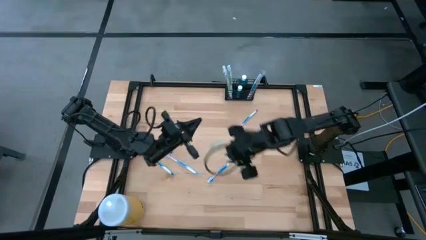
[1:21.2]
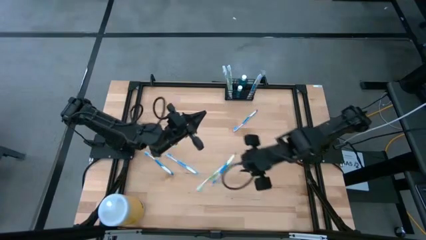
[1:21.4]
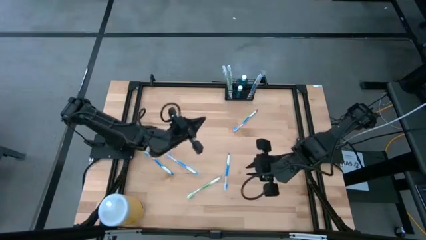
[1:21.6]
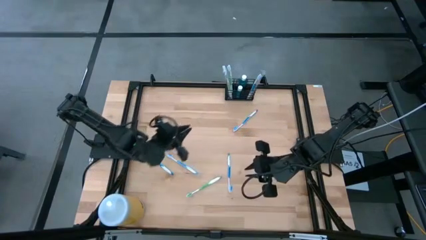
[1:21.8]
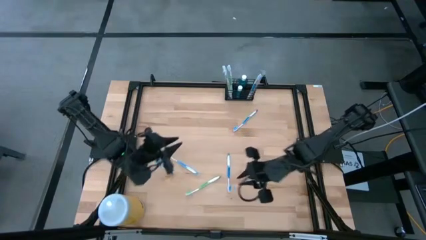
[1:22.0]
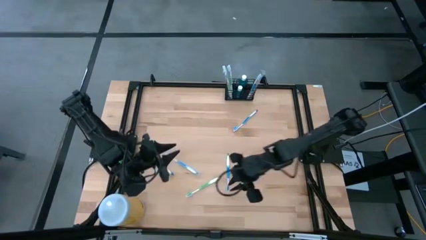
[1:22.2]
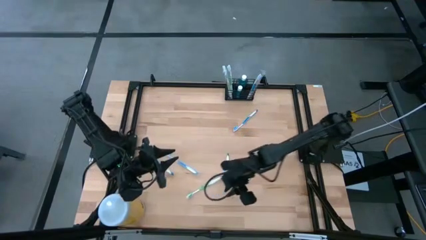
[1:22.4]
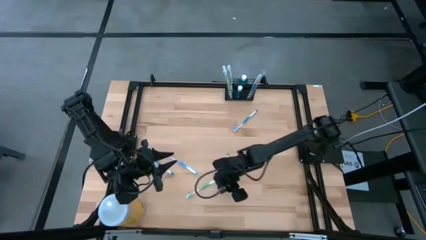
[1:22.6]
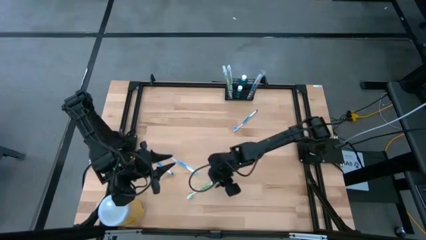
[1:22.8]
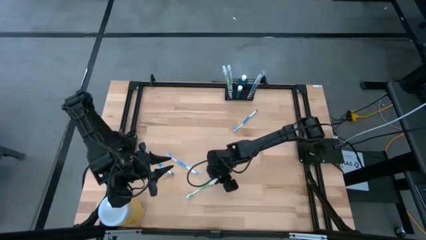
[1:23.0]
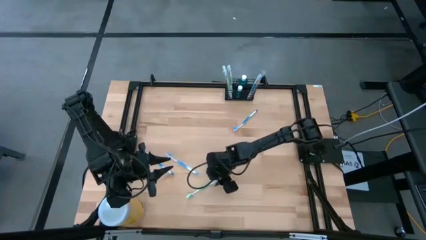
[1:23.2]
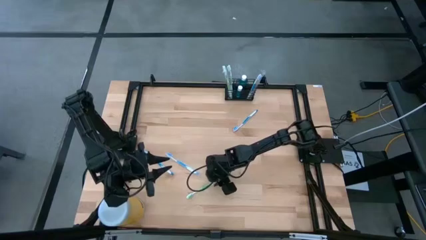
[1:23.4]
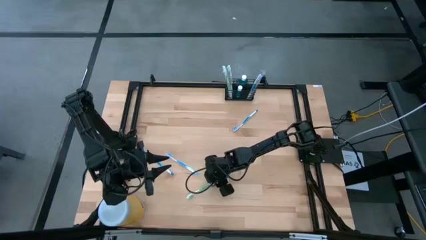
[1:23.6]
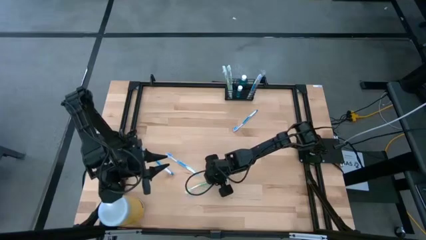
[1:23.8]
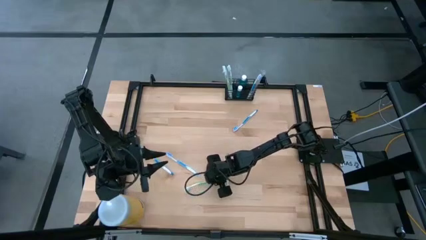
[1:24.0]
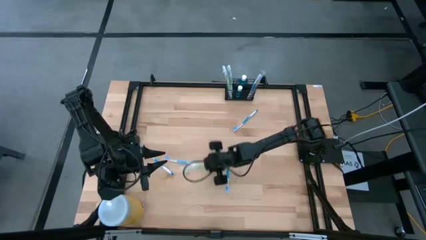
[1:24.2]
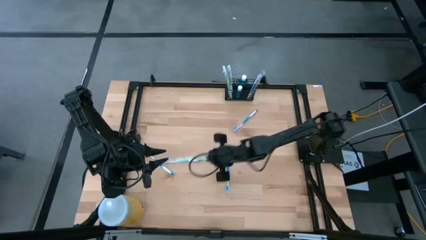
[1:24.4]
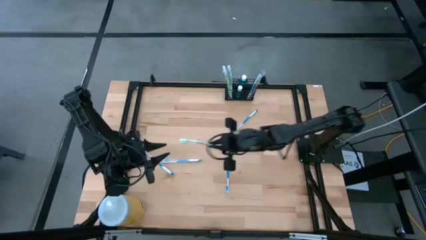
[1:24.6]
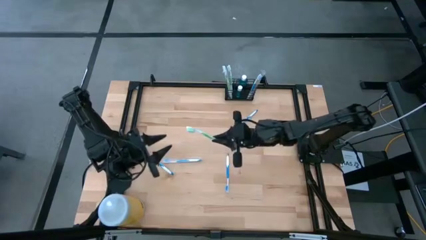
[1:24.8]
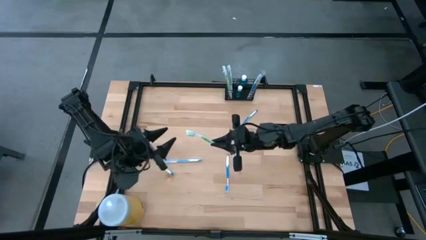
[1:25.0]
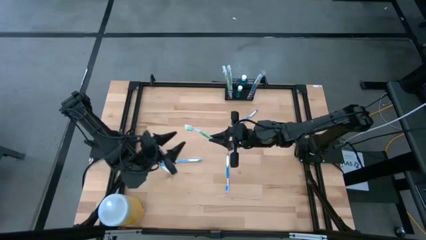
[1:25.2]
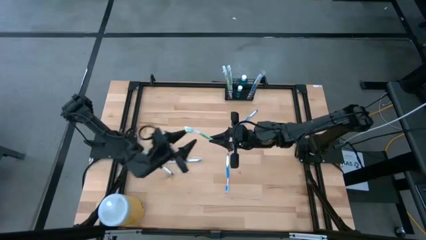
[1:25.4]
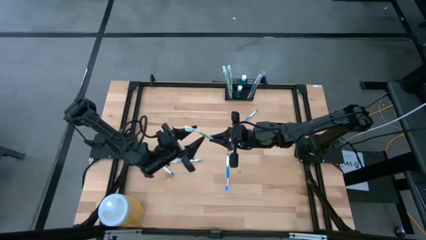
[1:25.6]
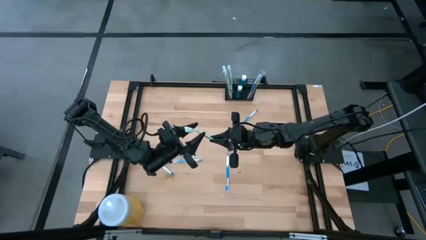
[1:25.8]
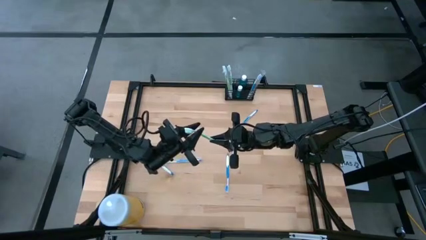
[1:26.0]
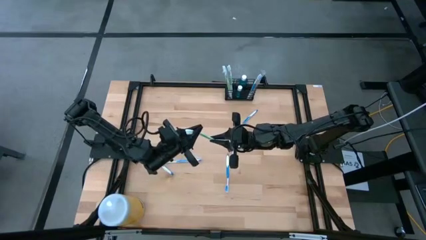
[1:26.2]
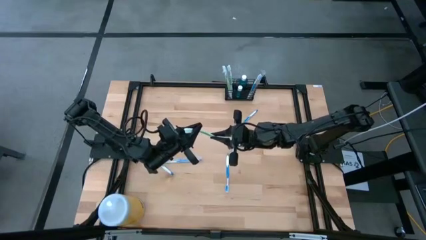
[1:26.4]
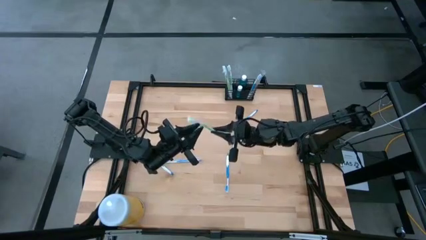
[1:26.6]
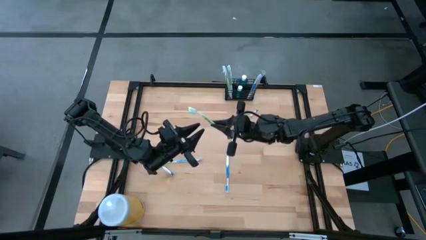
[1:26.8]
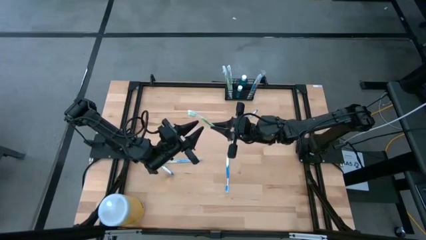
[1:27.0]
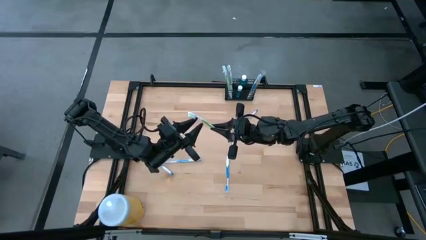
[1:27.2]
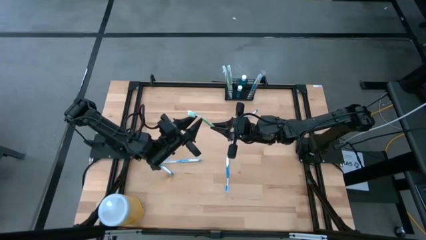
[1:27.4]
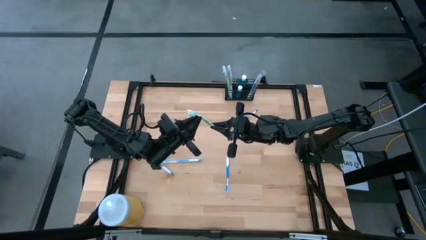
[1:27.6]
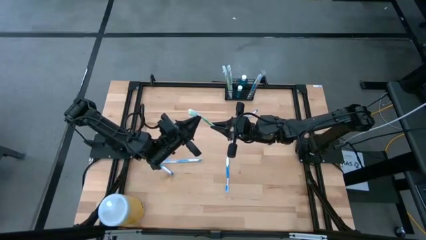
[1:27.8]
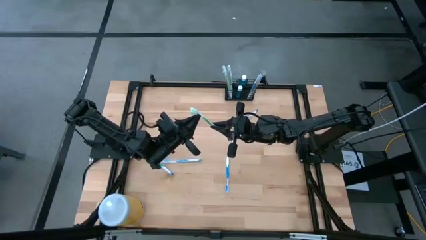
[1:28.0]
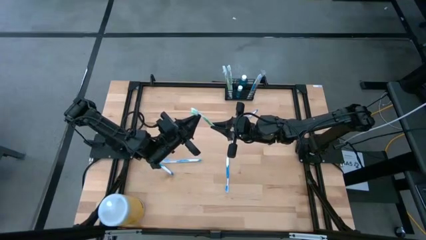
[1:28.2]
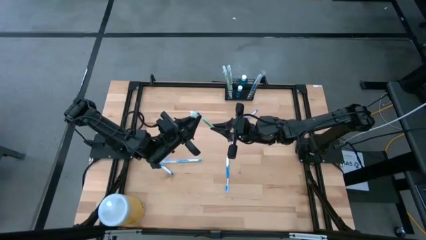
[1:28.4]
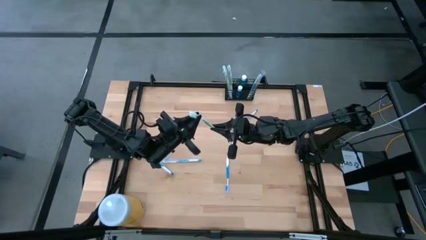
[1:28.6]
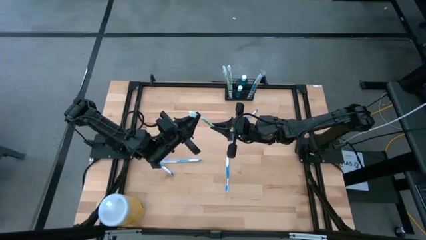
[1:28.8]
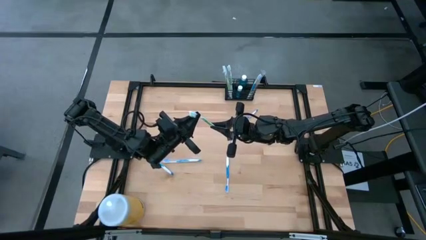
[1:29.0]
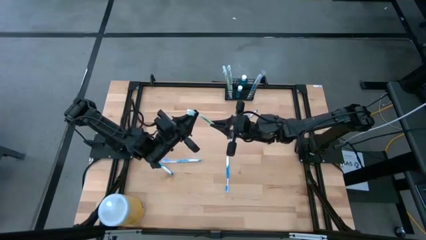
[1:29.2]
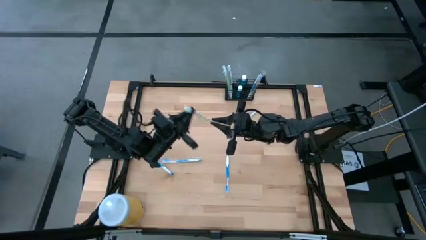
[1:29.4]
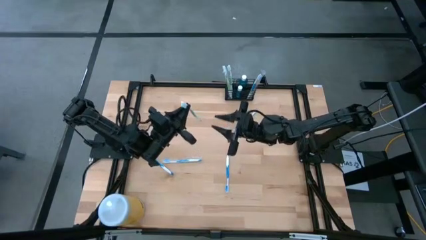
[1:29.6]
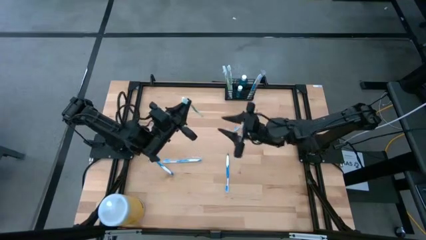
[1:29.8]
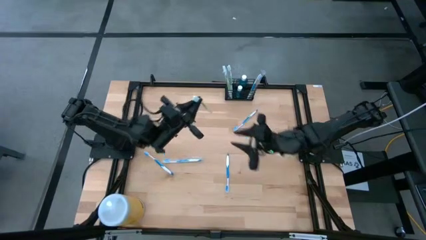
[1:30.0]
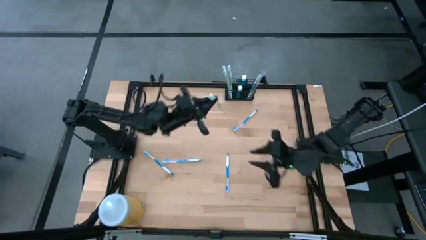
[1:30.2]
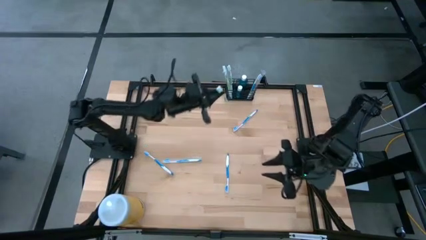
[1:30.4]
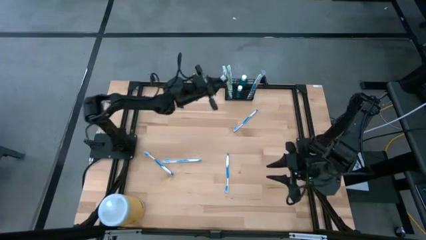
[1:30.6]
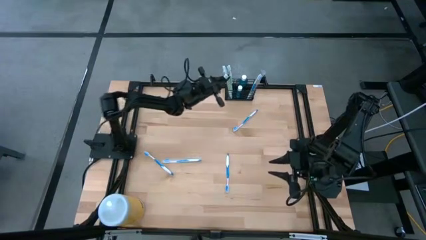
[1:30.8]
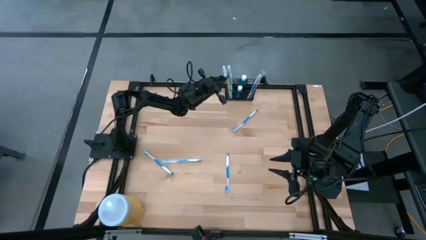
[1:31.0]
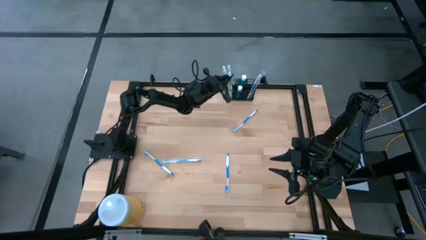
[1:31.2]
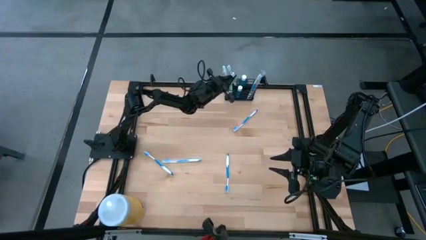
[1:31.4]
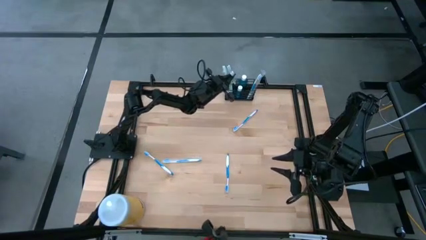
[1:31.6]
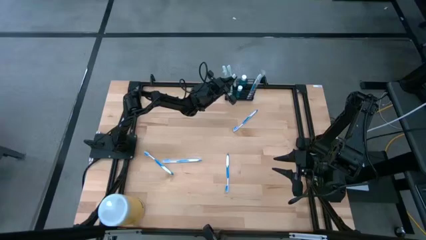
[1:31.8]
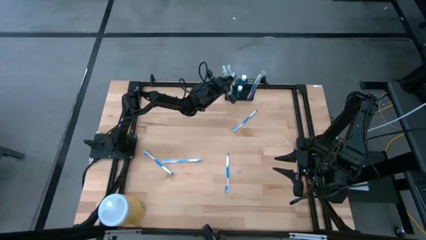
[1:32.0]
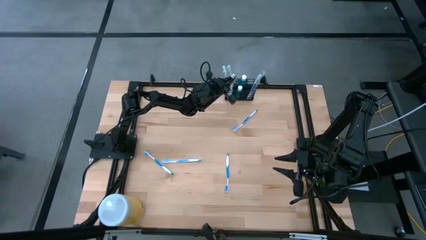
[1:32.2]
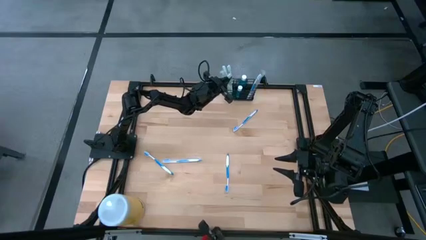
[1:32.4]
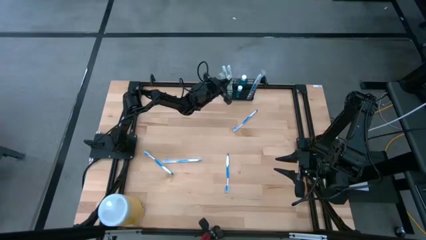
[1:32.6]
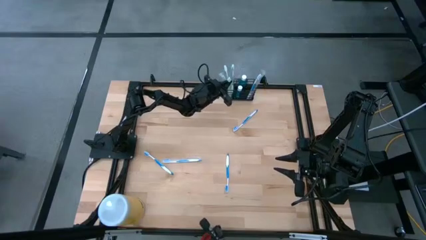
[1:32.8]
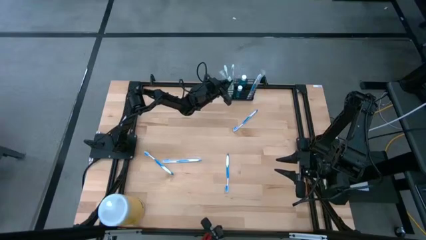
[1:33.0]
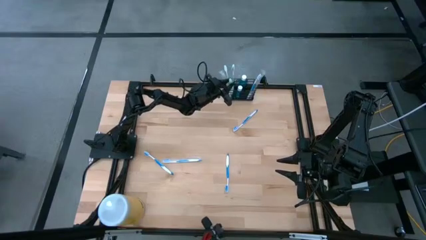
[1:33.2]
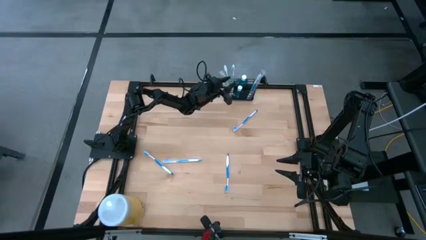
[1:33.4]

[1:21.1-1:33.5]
Task: Pick & Place toothbrushing station
Put the green toothbrush into the black organizer

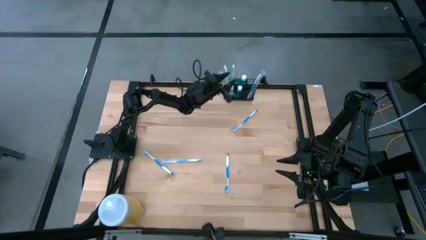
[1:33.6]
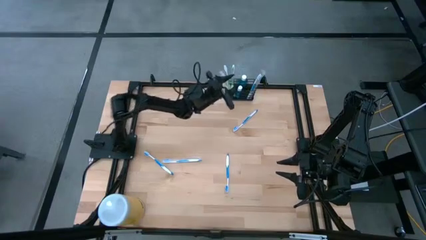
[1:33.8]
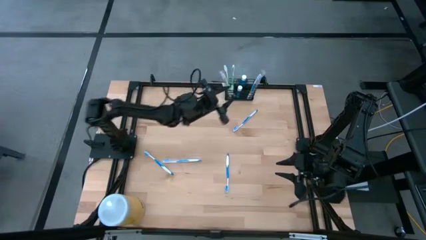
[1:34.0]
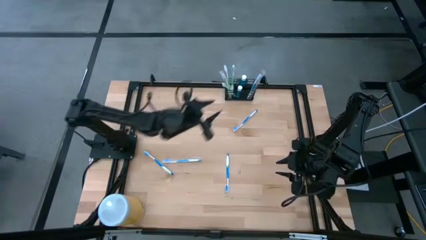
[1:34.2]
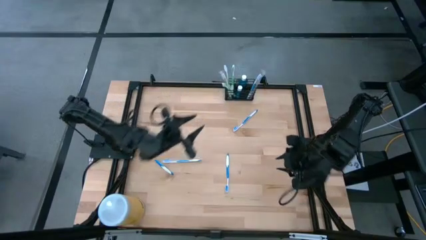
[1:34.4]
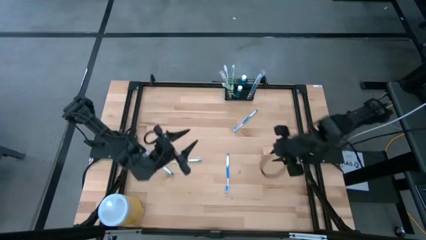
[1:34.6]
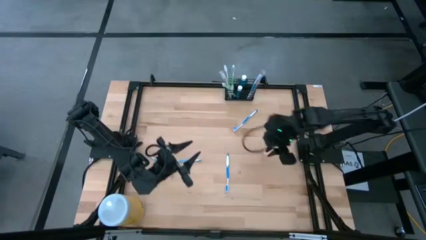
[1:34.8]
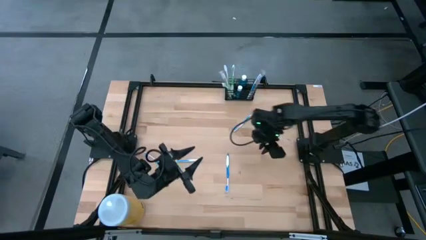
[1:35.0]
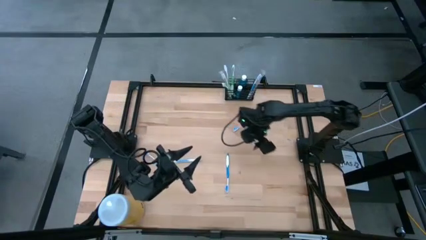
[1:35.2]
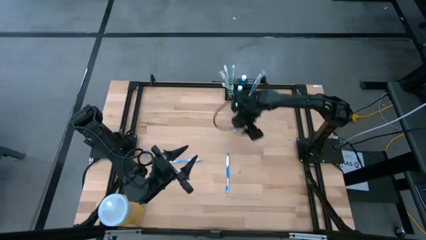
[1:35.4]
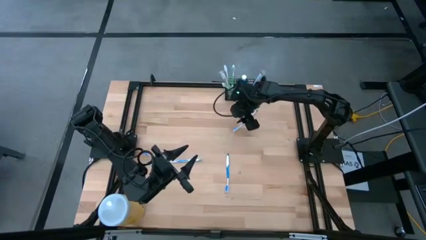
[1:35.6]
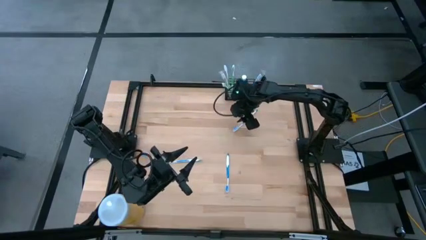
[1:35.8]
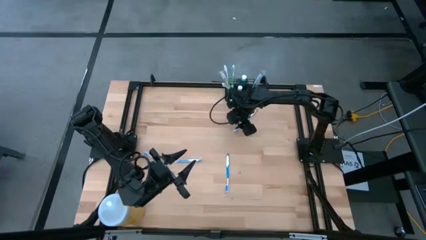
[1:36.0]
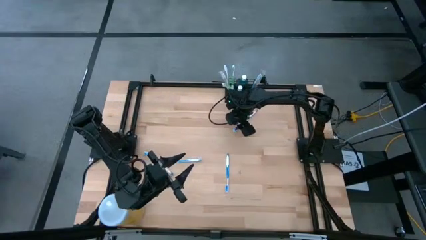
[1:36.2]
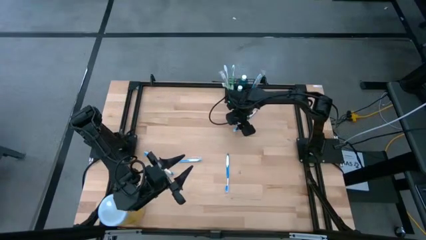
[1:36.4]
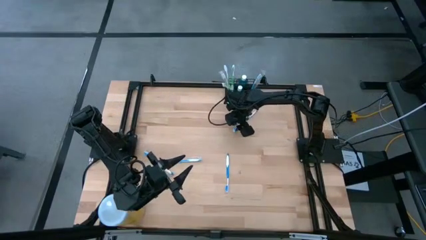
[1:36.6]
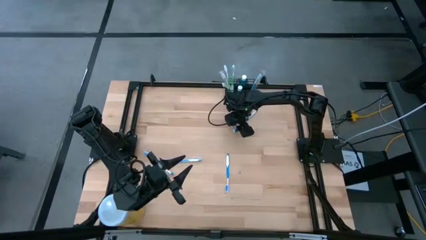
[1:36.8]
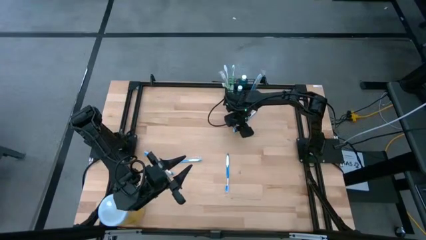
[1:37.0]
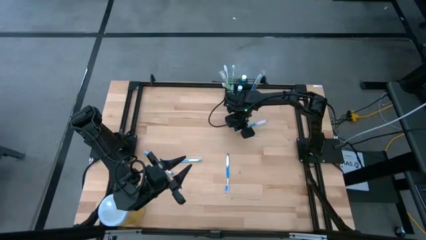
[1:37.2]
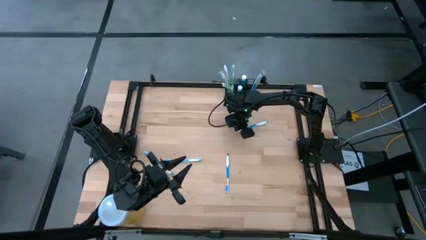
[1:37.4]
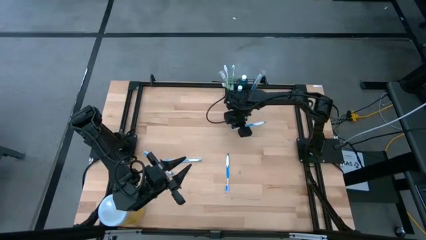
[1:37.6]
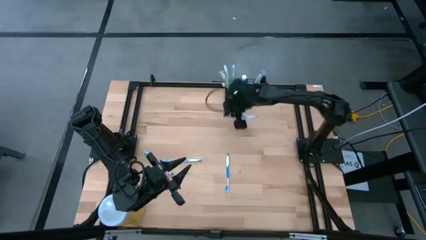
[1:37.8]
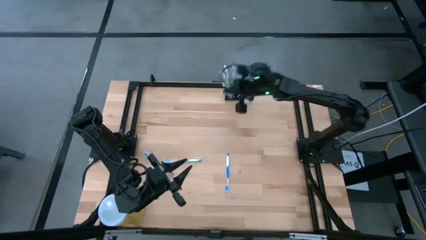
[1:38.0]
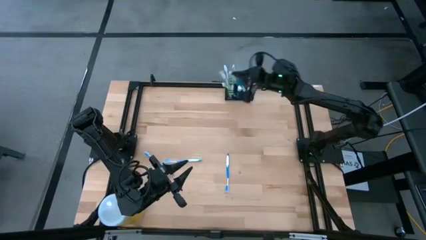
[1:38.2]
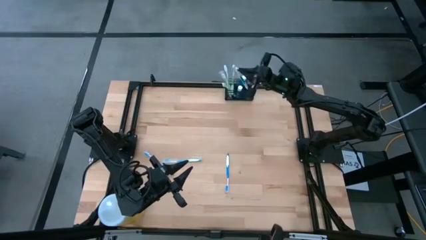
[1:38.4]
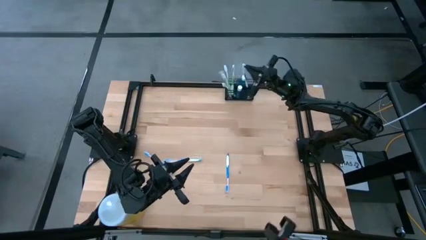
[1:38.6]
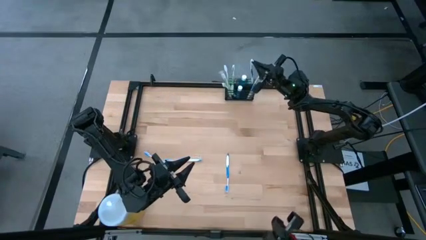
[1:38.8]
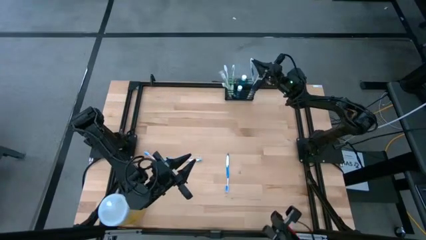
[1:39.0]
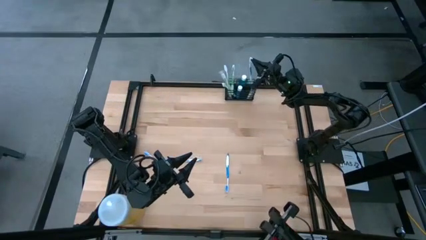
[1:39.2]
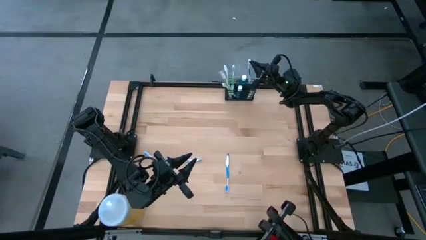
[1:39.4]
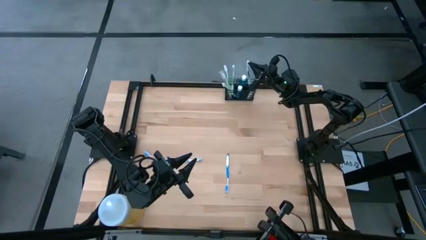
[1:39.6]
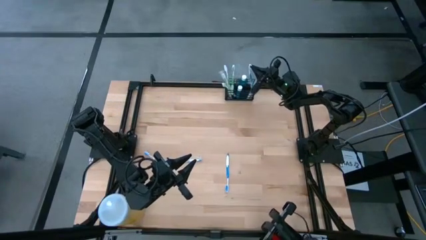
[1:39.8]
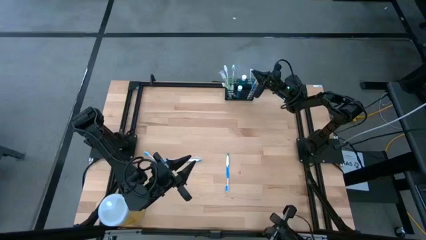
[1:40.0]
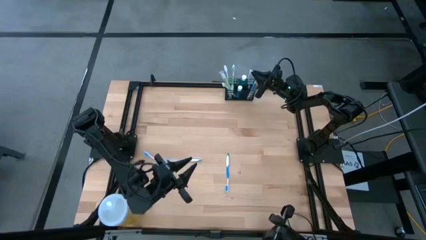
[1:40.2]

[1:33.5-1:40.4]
Put the blue toothbrush into the black organizer
